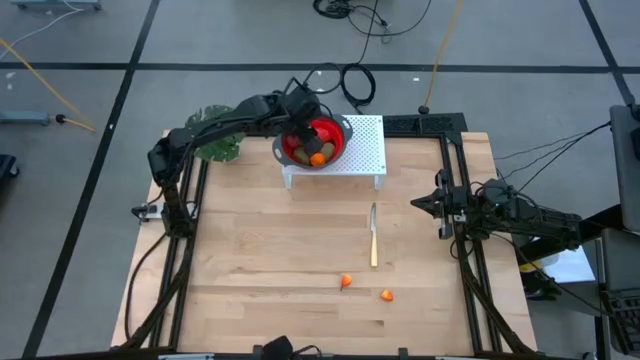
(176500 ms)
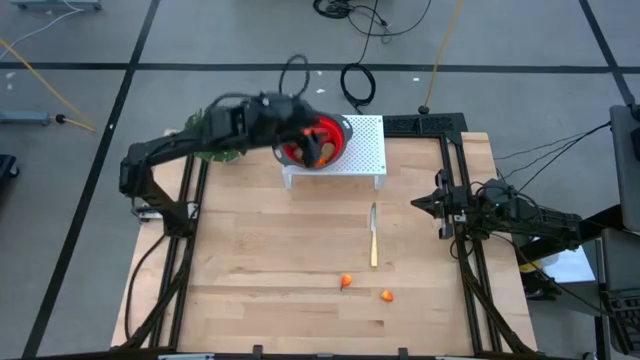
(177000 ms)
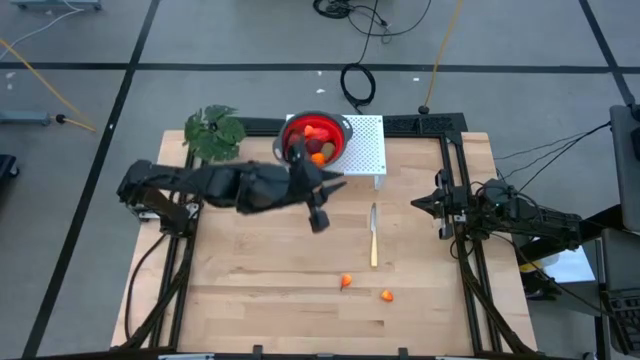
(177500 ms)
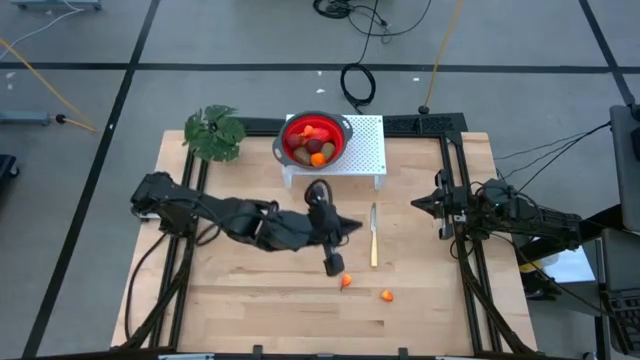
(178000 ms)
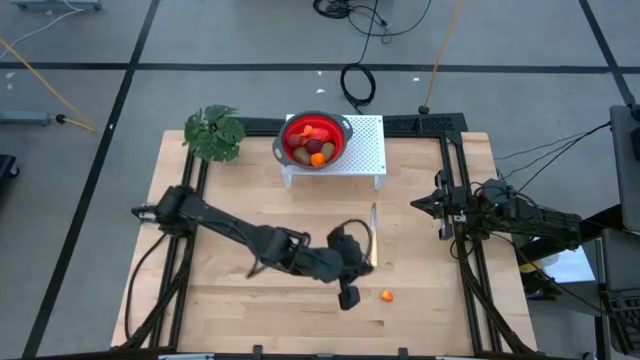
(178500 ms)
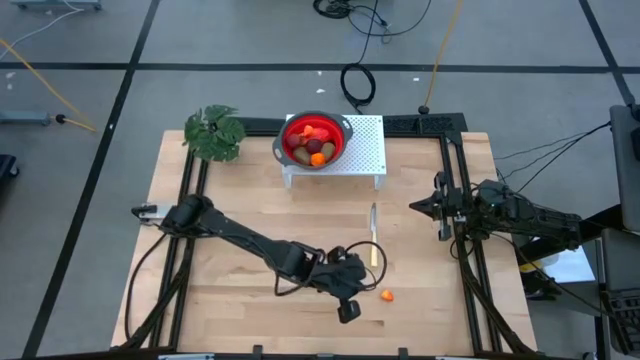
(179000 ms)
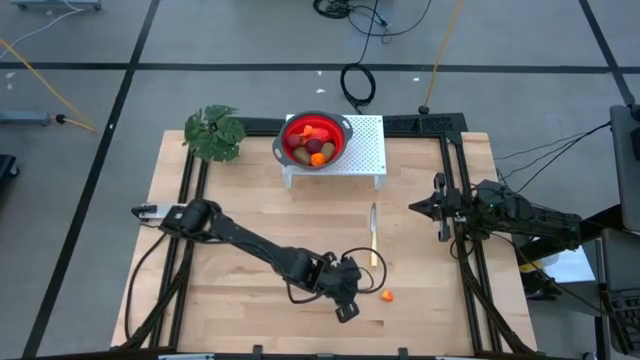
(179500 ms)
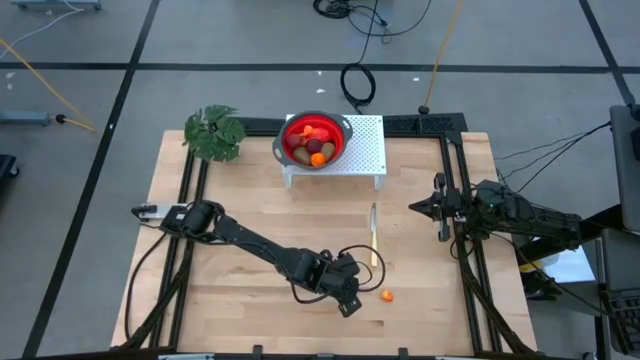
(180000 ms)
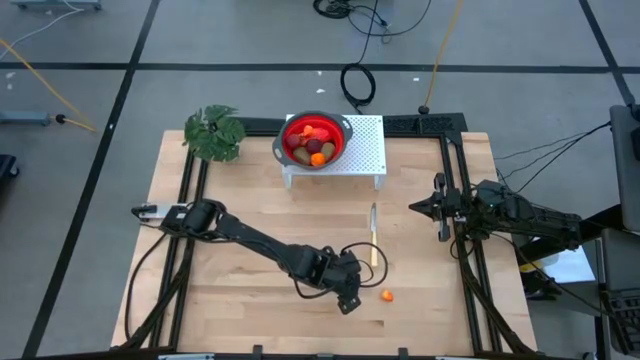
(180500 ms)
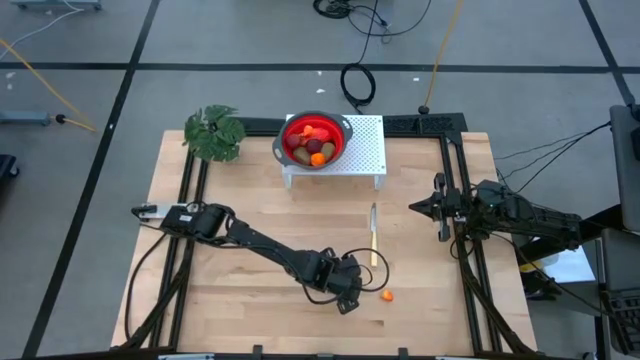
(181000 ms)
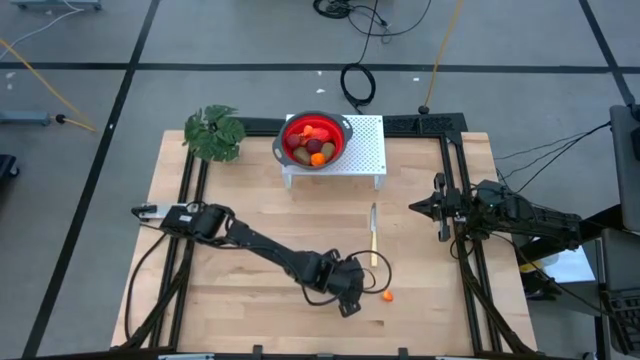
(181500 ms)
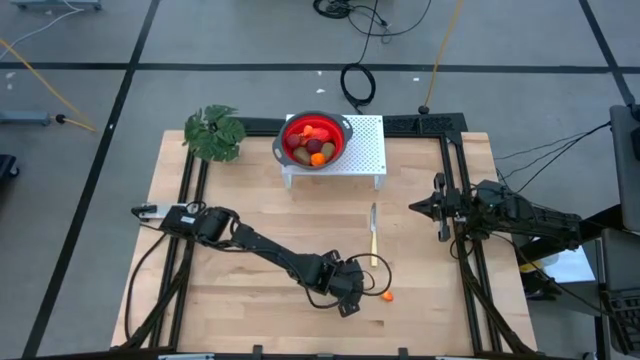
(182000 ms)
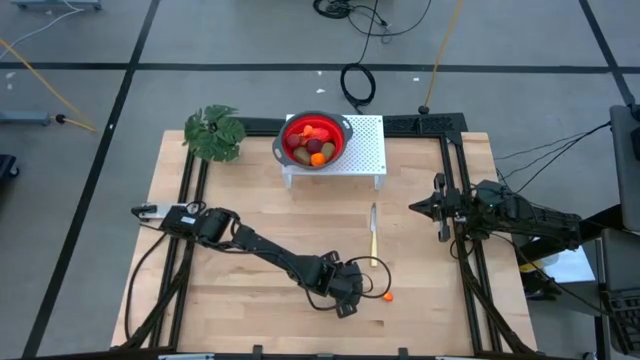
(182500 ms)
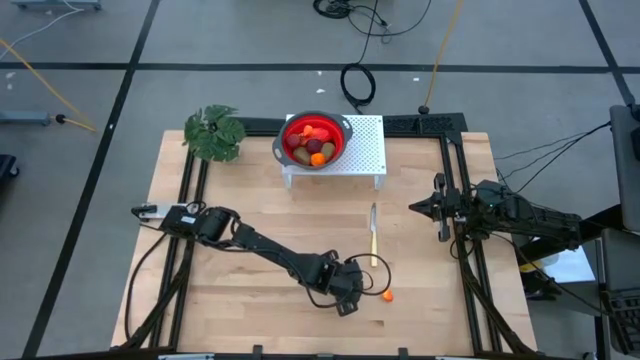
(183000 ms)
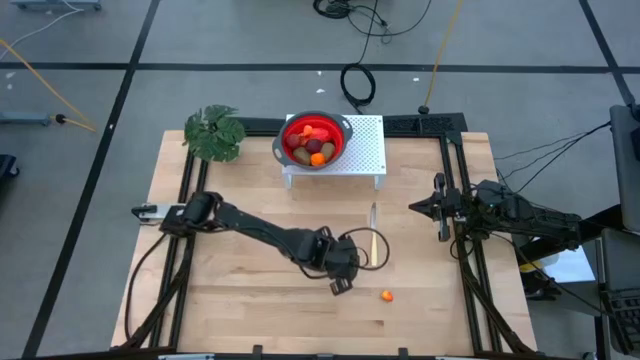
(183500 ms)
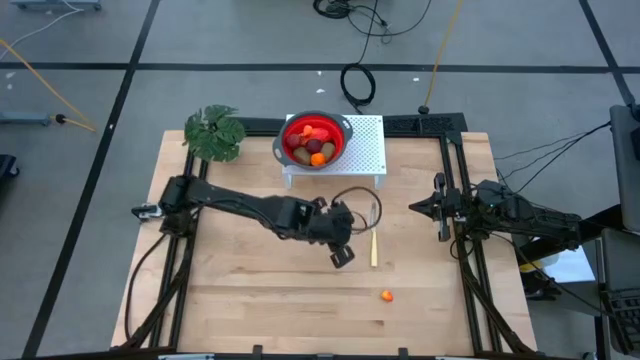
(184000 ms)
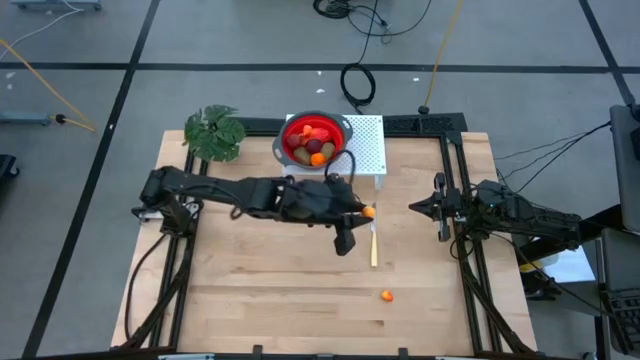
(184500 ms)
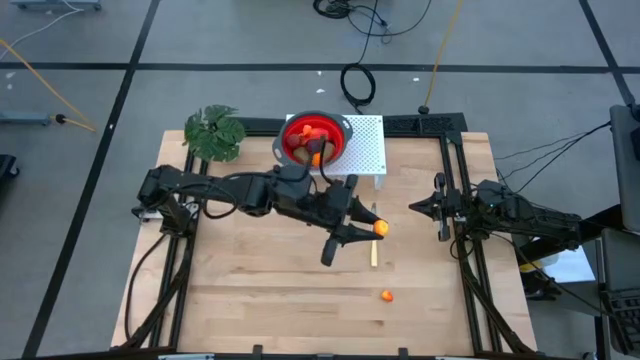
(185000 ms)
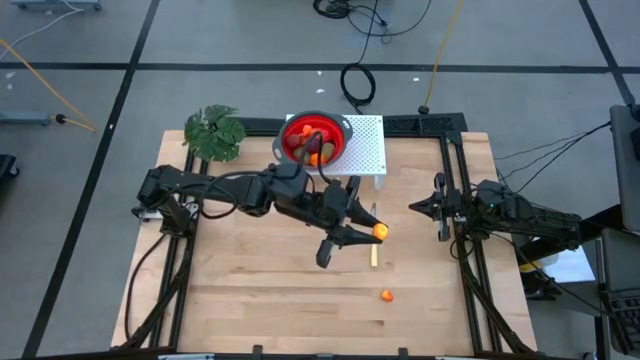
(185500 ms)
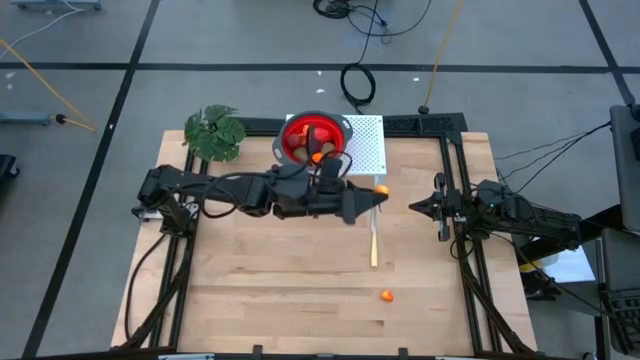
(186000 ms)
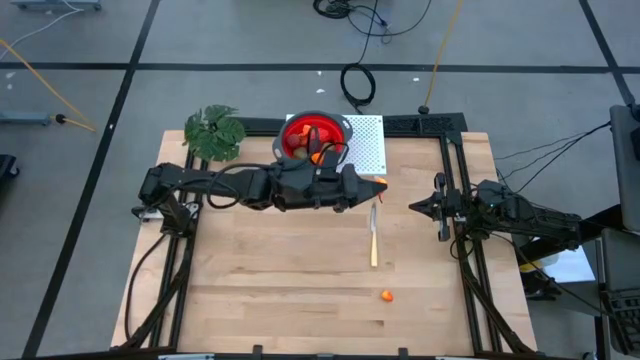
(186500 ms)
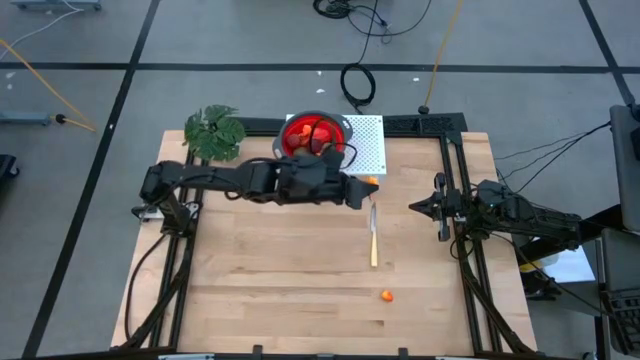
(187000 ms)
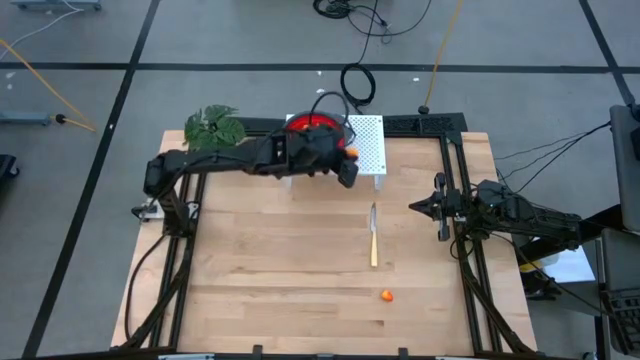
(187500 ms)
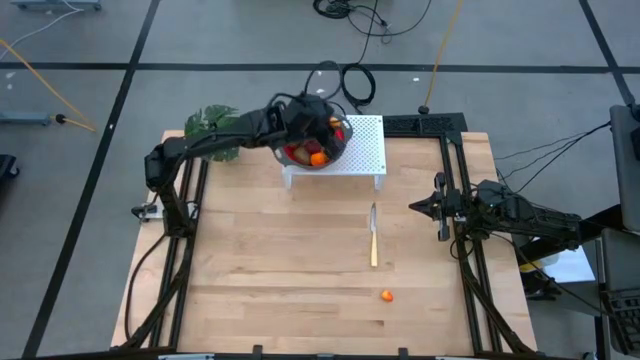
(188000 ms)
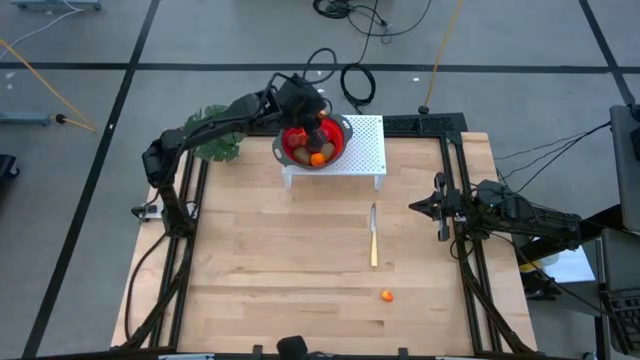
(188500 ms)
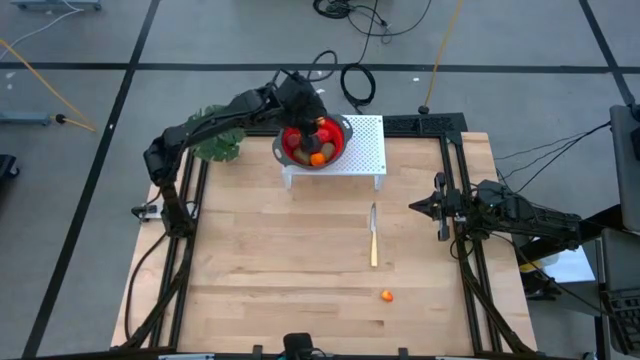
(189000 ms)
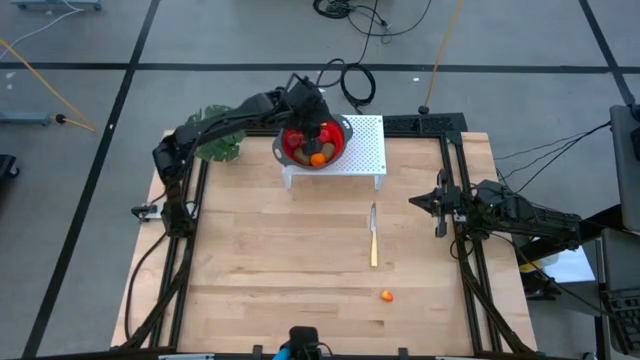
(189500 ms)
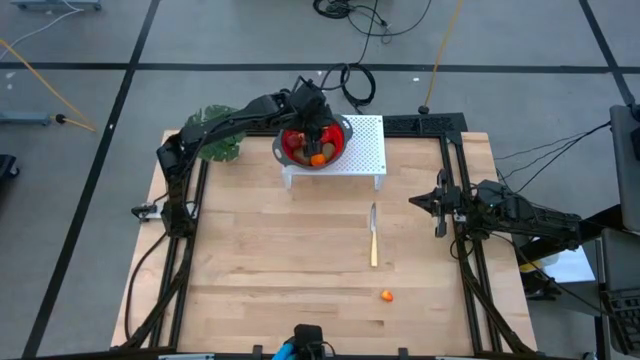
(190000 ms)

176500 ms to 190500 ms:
Task: Pick & Place Fruit
Put the orange pear into the red strainer bowl on the shelf
